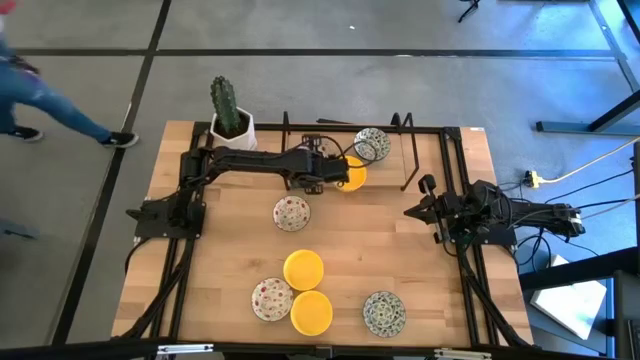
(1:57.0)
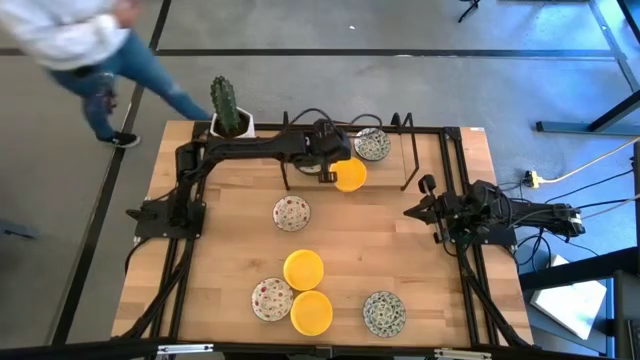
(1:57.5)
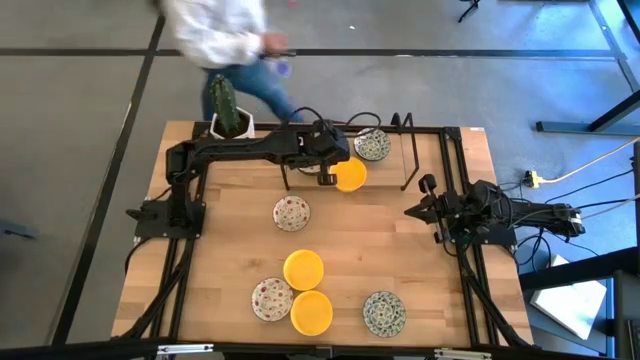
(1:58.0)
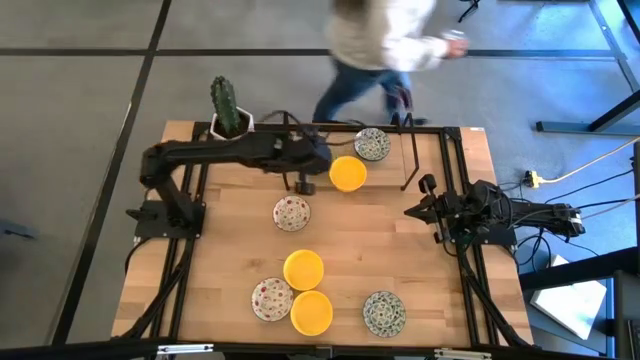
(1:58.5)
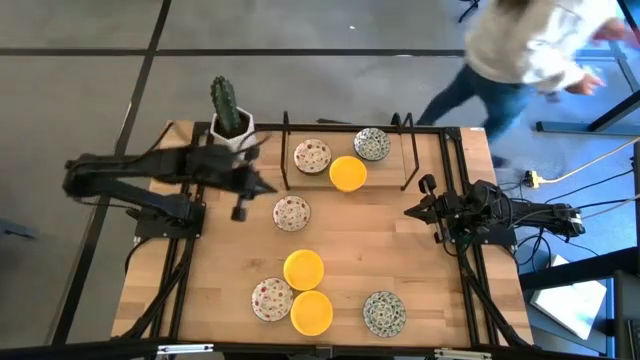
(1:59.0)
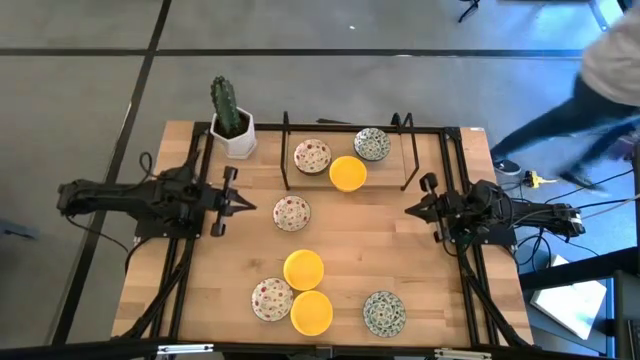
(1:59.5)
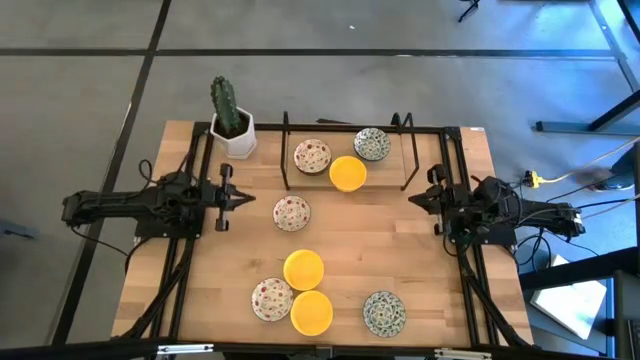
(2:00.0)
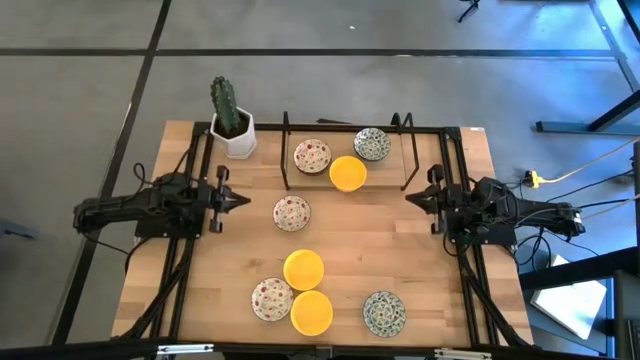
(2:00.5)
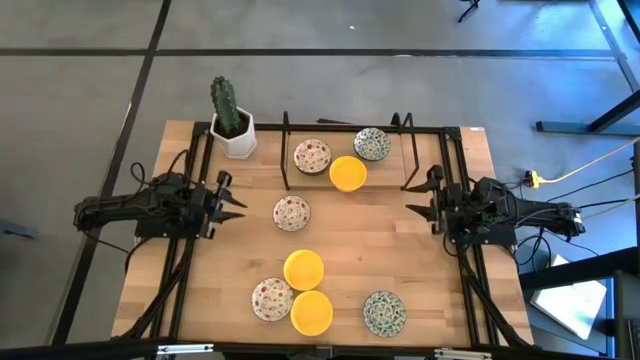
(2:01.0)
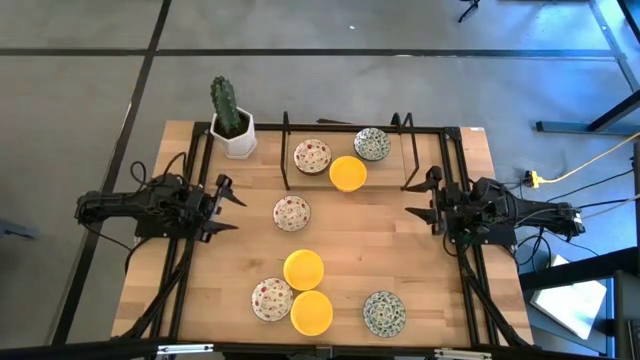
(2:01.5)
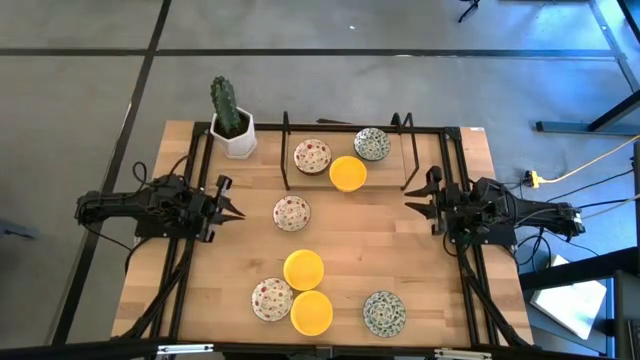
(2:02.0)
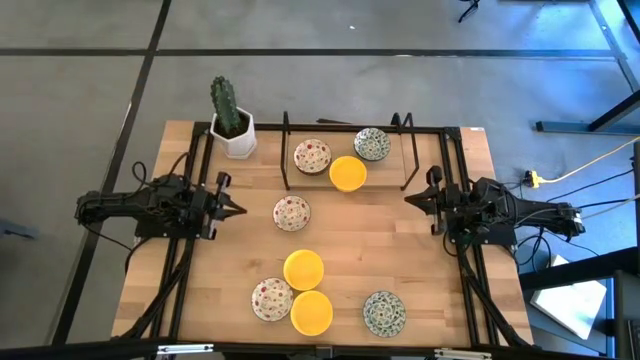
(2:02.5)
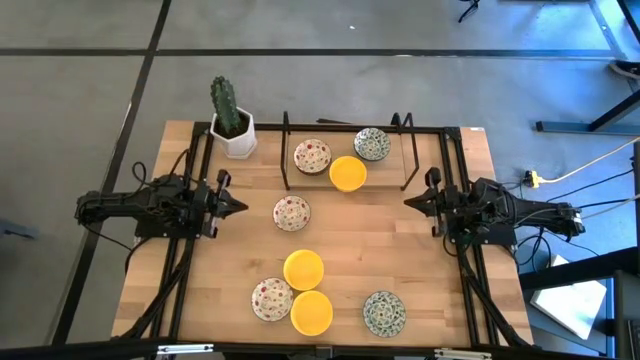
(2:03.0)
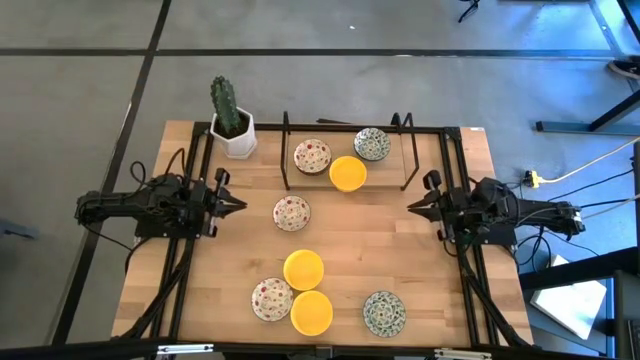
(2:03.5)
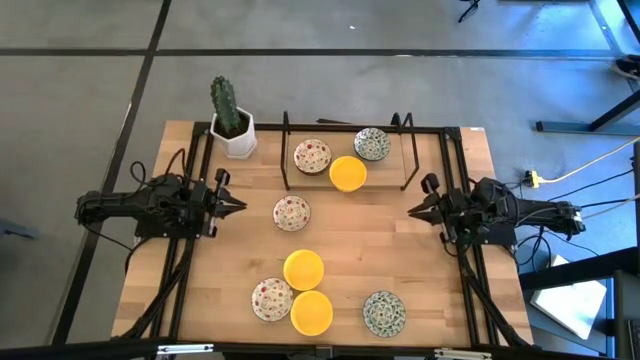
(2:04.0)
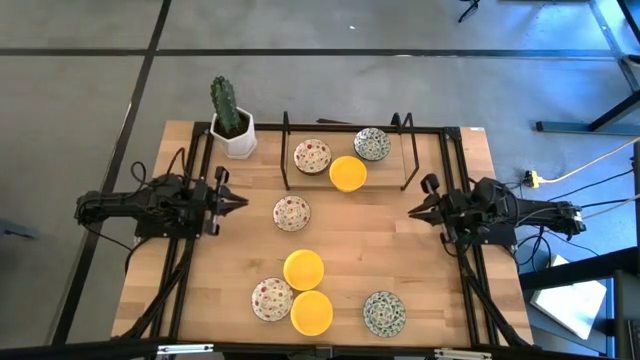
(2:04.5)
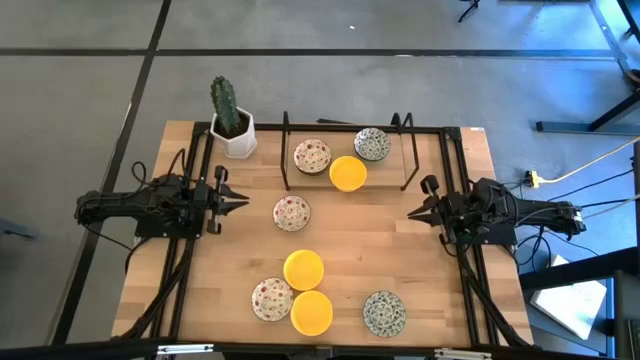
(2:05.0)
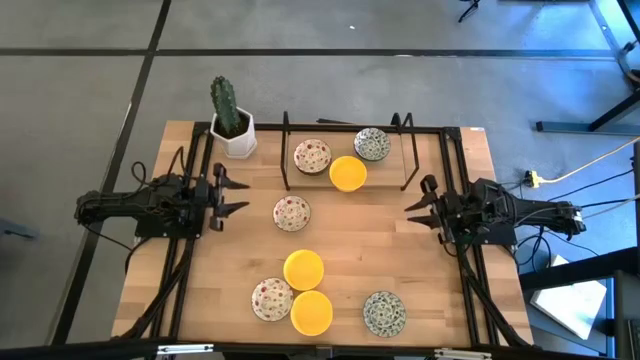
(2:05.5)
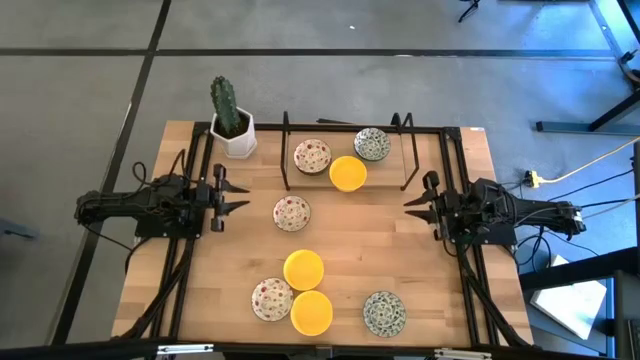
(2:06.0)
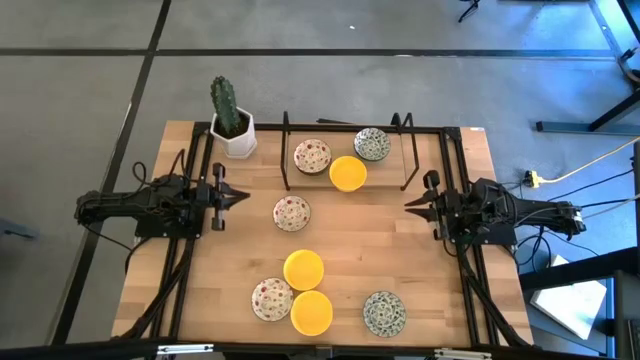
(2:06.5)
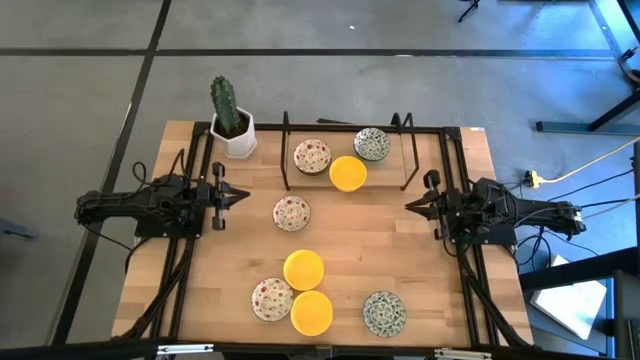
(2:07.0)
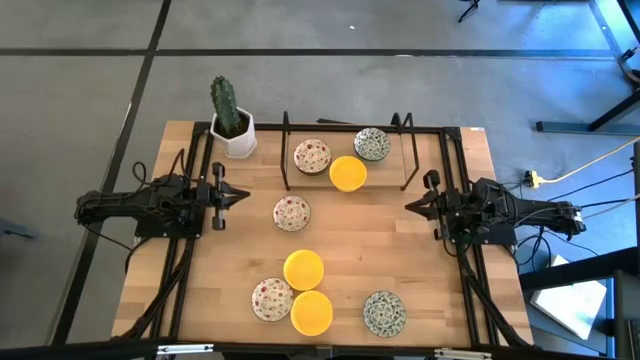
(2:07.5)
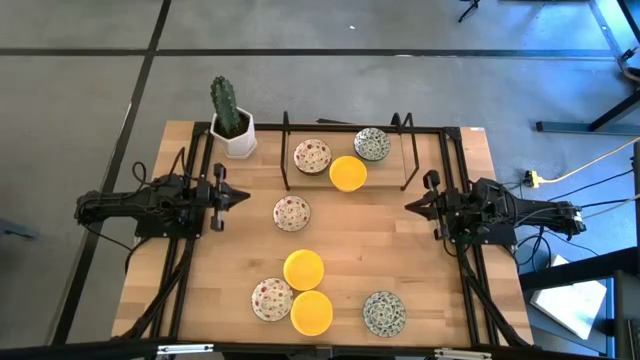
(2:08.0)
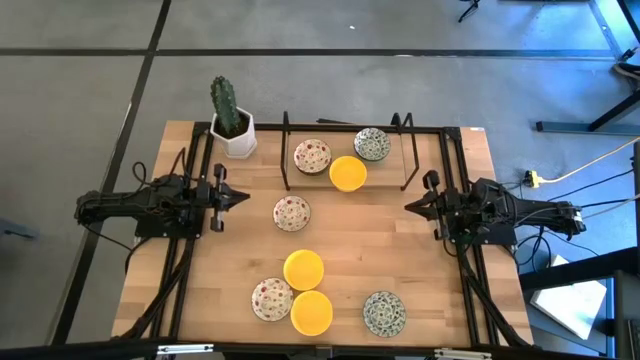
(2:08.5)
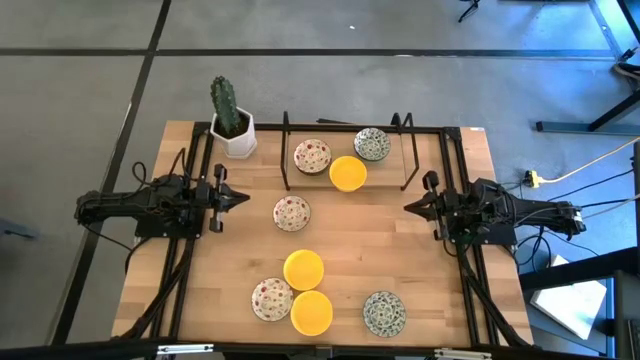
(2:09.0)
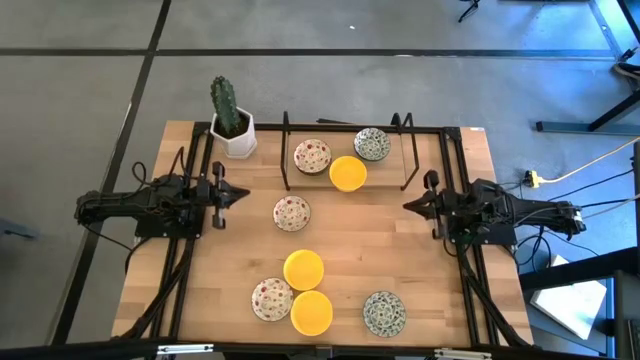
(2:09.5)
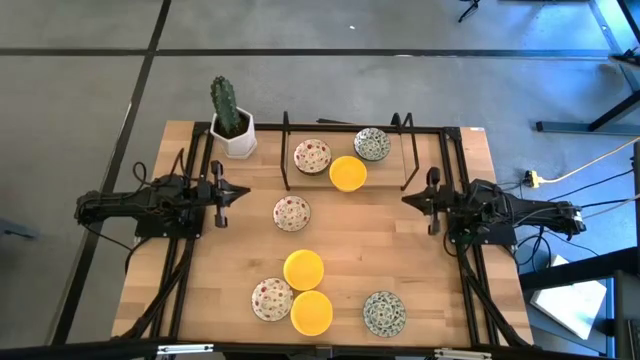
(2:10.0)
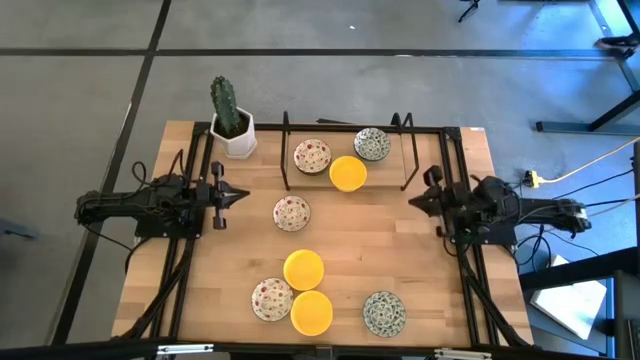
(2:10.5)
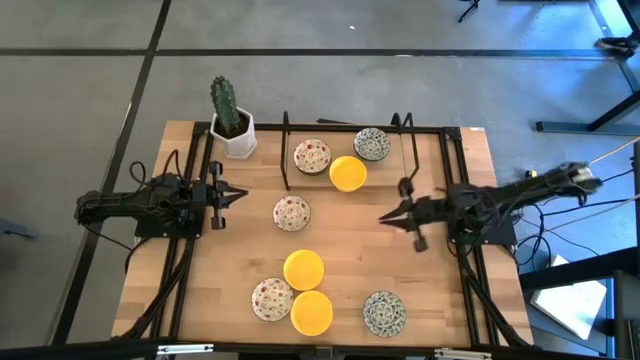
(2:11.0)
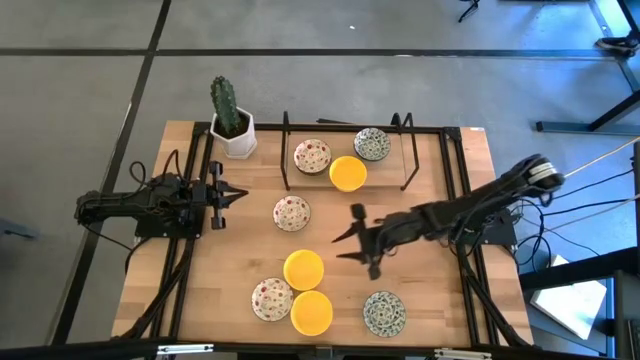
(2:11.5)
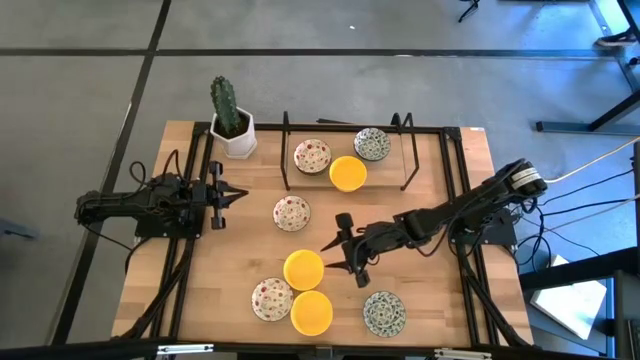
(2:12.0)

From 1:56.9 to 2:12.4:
Task: Pick & Place Mini bowls
Stack the yellow bowl on the yellow bowls on the shelf

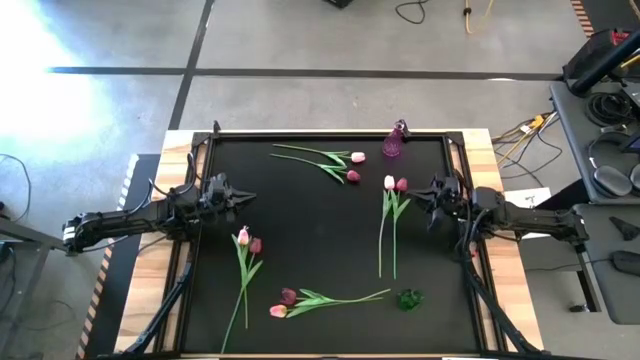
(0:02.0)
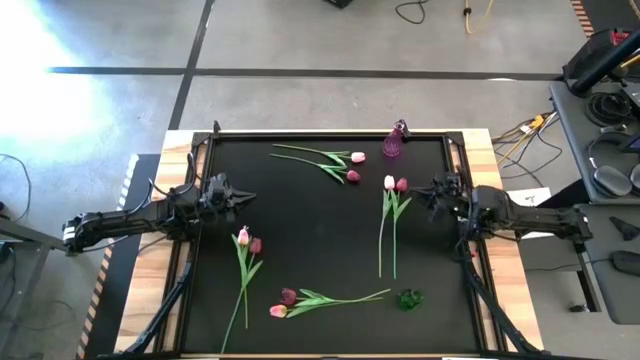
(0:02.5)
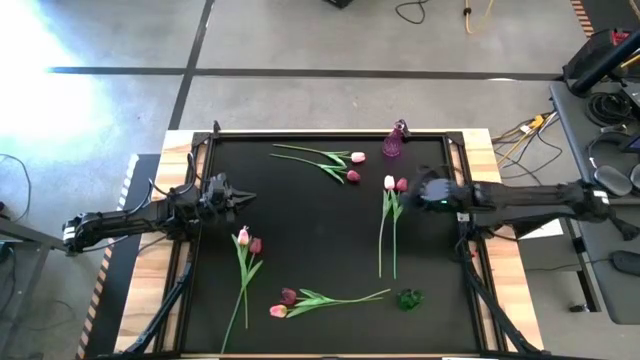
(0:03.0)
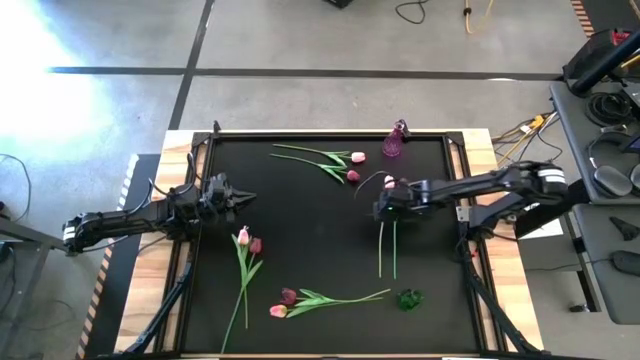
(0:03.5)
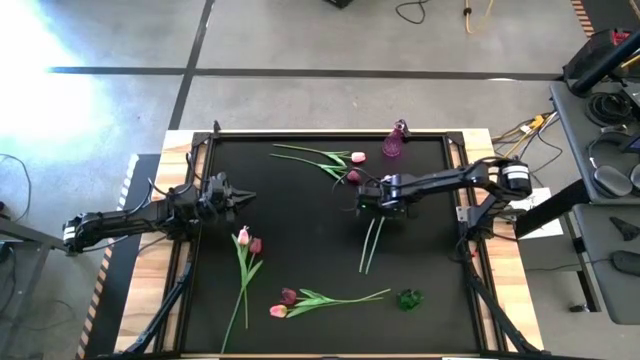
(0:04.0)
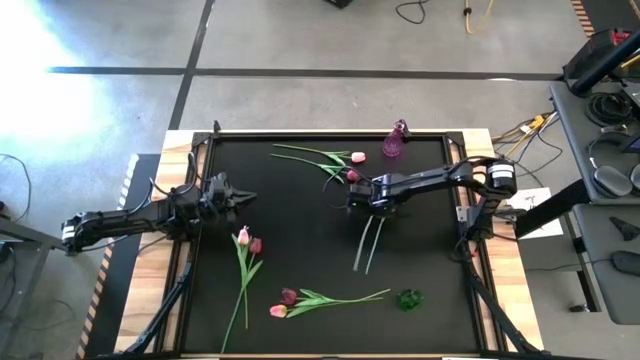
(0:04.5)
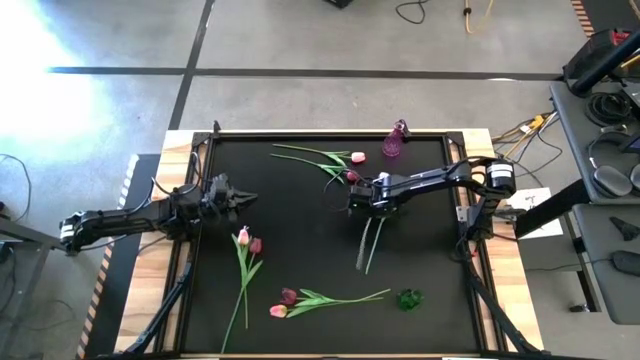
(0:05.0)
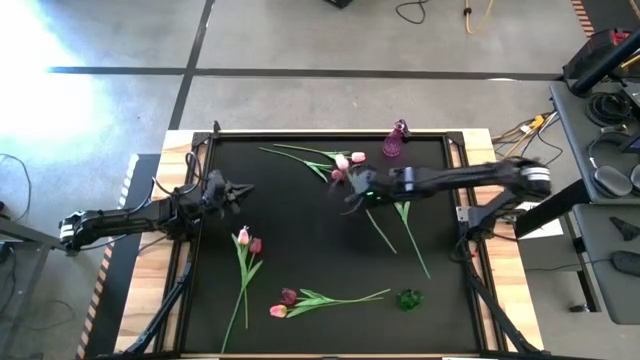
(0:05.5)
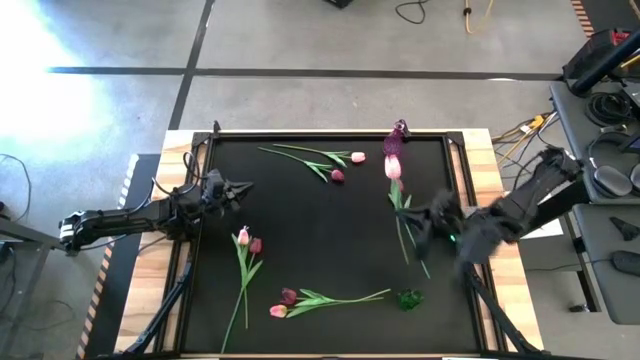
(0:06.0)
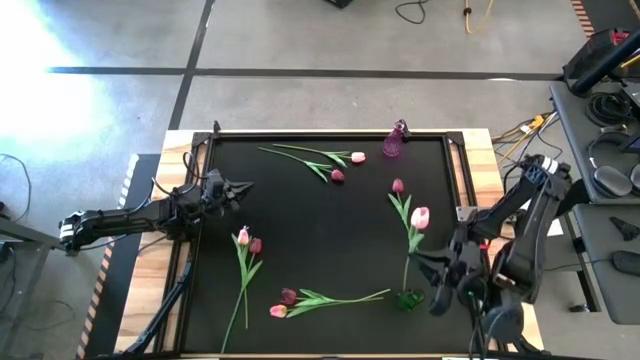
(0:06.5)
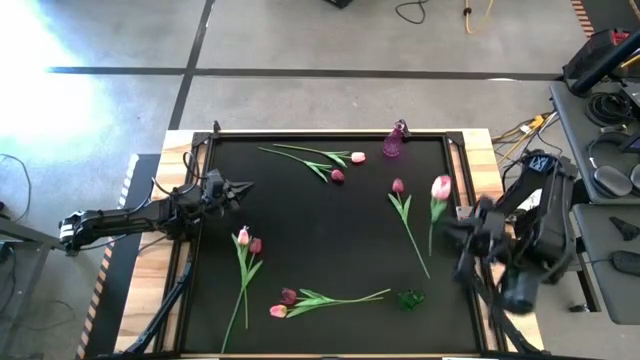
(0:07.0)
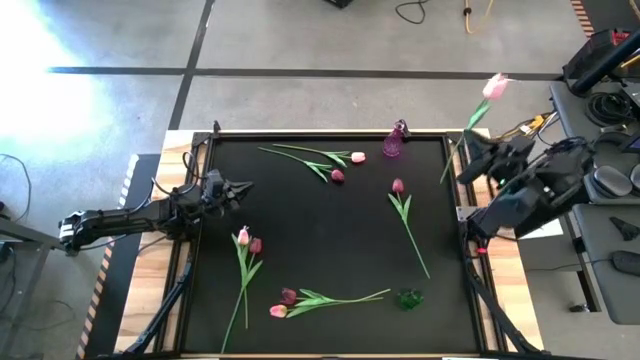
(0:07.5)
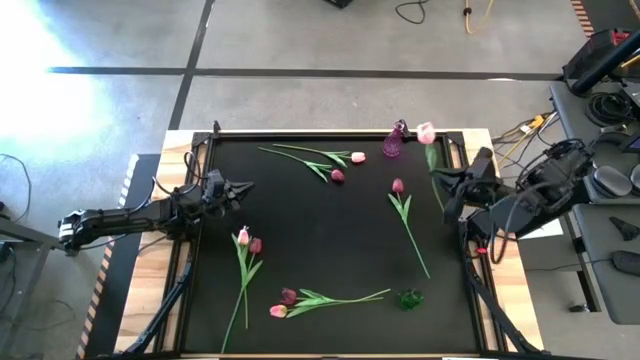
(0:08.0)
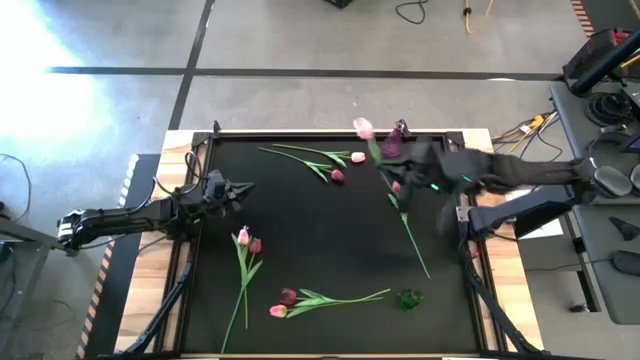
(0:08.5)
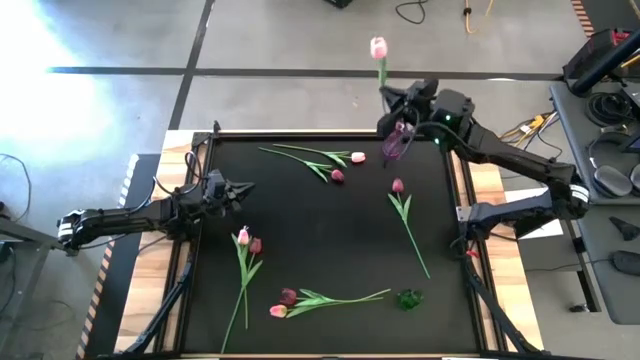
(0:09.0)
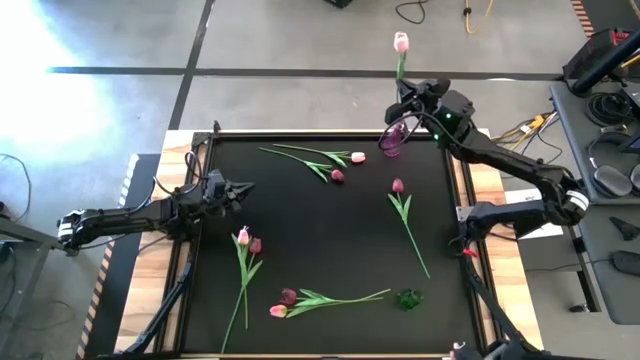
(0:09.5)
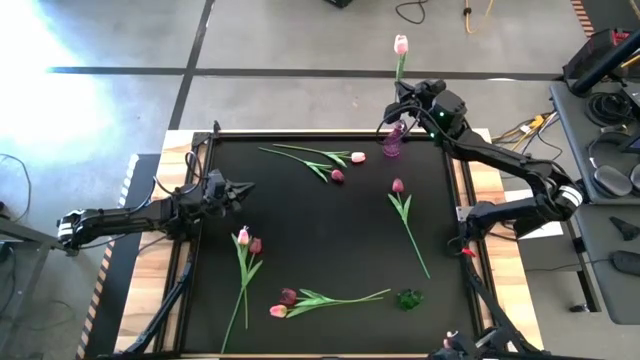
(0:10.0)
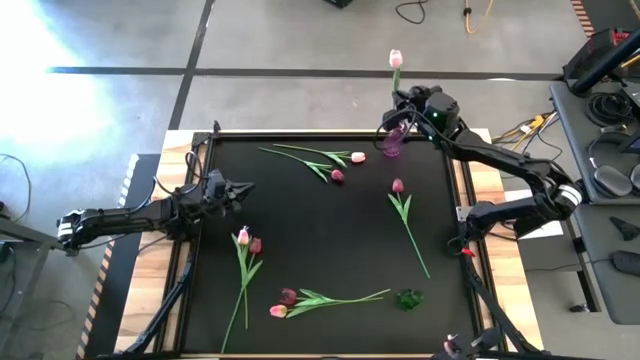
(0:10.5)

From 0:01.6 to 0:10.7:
Task: Sort flowers into vase by color
Put the middle right pink tulip into the transparent pink vase
